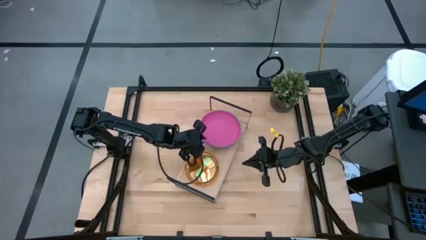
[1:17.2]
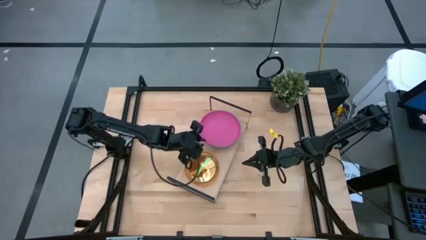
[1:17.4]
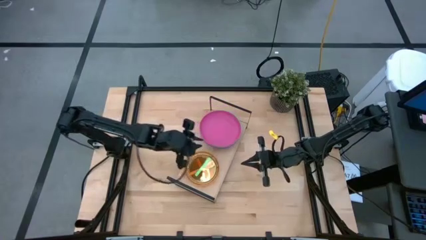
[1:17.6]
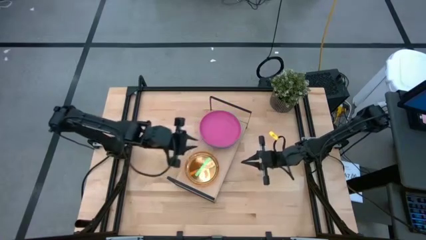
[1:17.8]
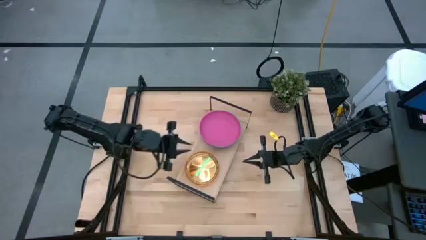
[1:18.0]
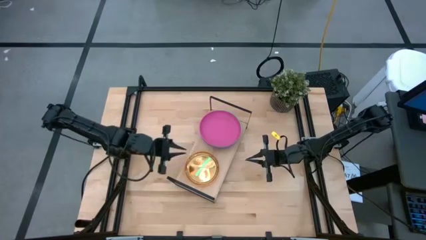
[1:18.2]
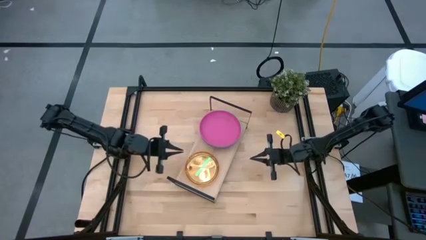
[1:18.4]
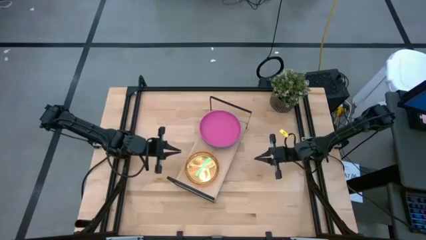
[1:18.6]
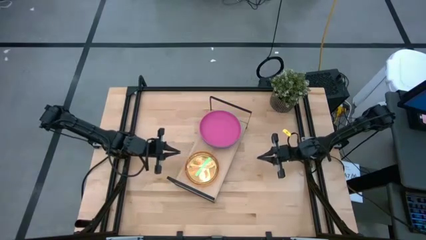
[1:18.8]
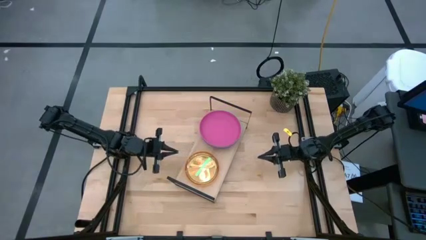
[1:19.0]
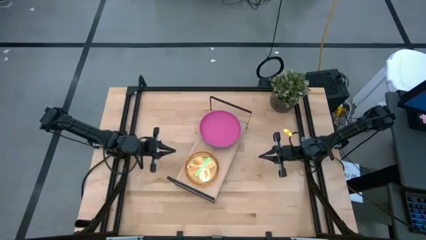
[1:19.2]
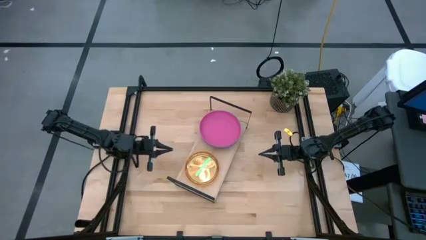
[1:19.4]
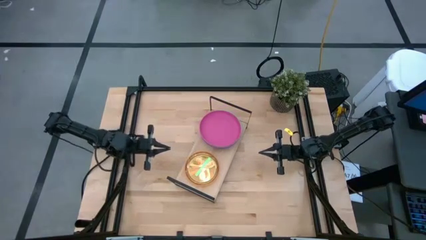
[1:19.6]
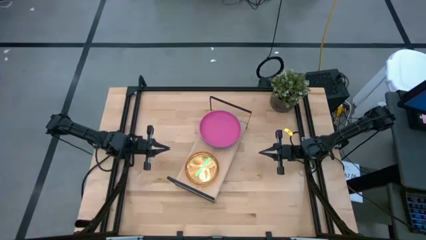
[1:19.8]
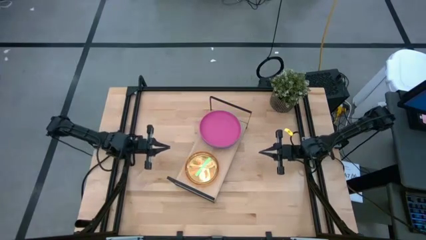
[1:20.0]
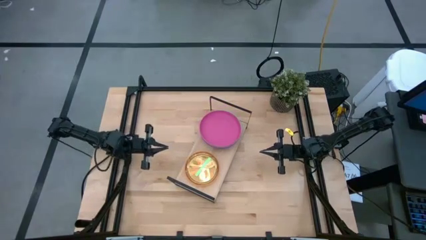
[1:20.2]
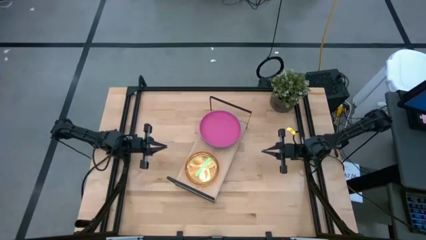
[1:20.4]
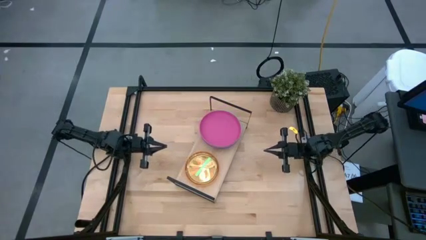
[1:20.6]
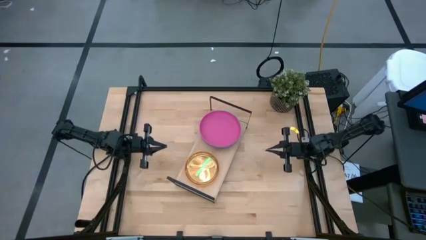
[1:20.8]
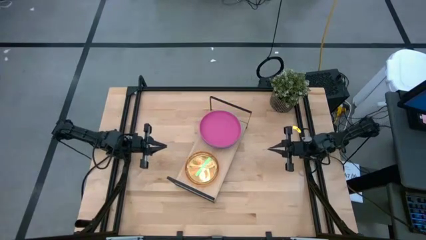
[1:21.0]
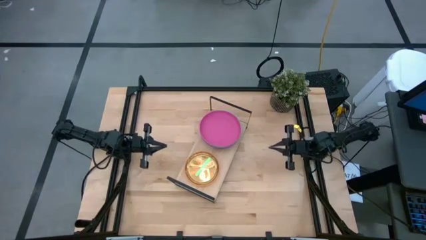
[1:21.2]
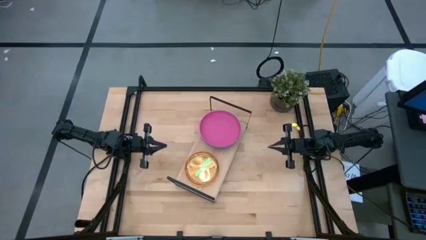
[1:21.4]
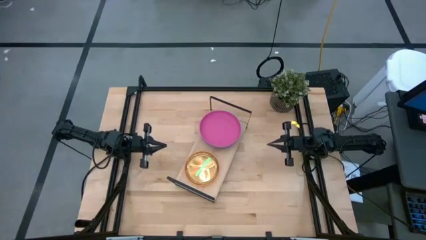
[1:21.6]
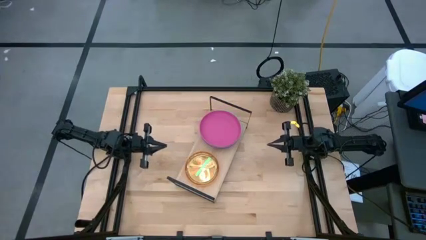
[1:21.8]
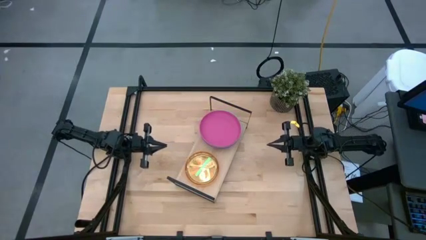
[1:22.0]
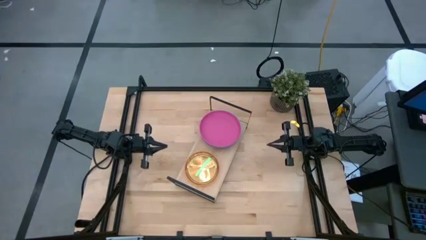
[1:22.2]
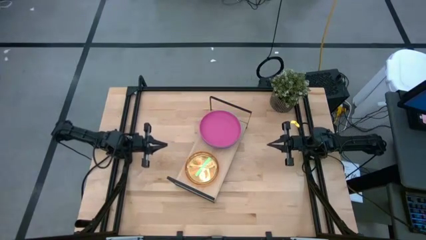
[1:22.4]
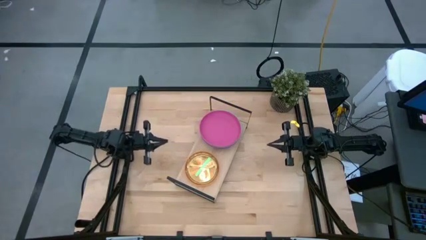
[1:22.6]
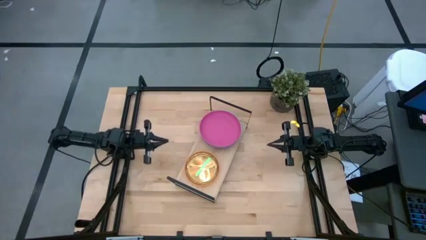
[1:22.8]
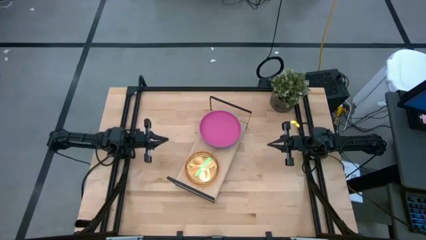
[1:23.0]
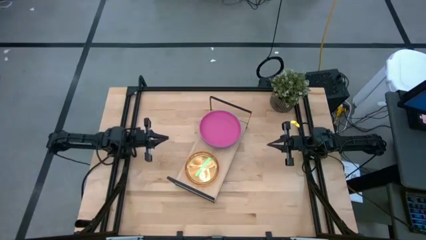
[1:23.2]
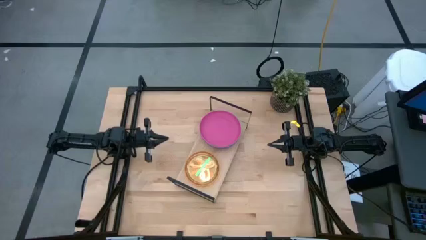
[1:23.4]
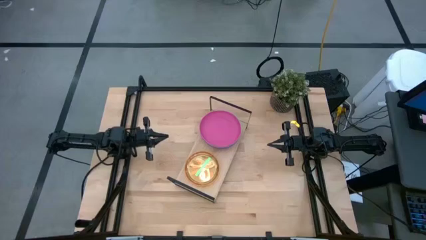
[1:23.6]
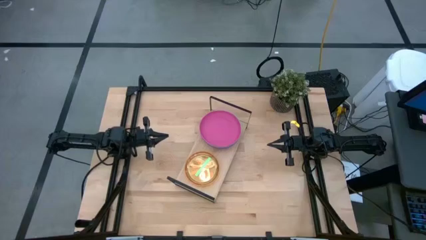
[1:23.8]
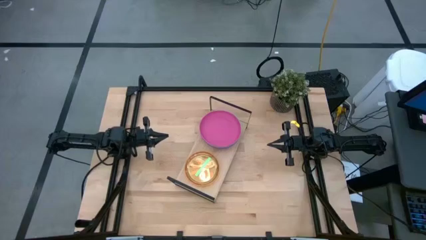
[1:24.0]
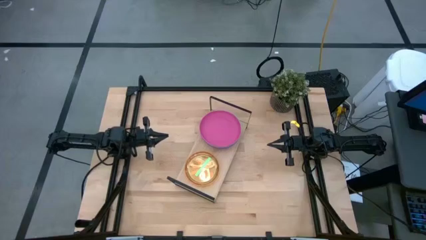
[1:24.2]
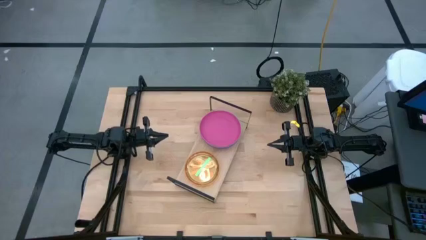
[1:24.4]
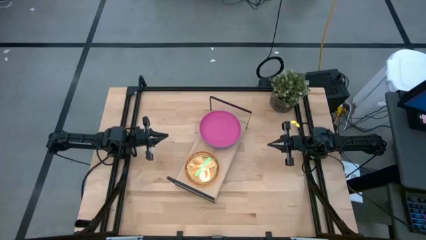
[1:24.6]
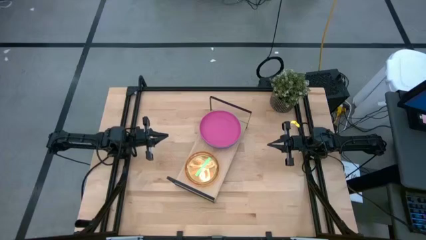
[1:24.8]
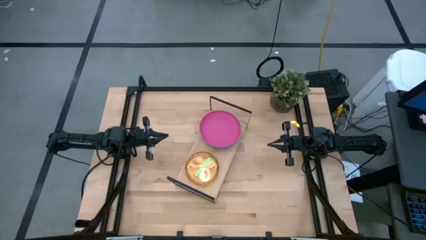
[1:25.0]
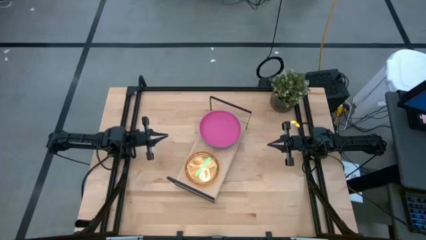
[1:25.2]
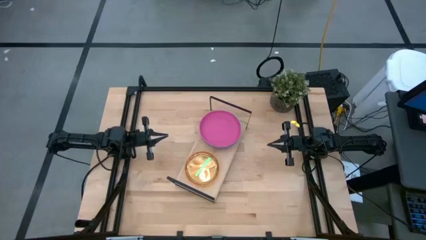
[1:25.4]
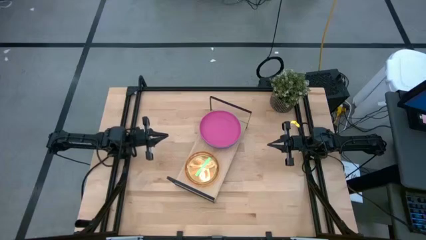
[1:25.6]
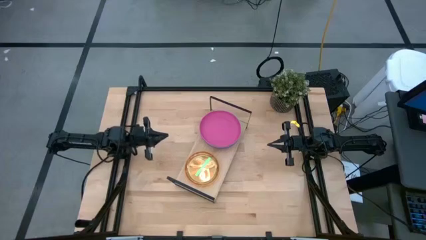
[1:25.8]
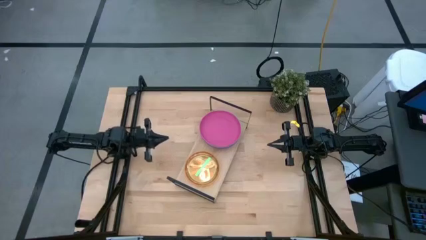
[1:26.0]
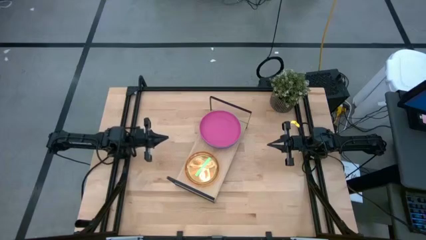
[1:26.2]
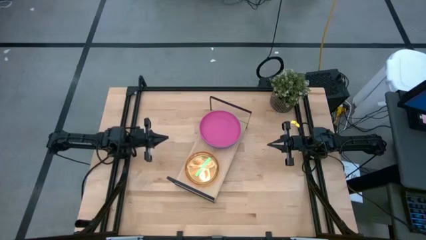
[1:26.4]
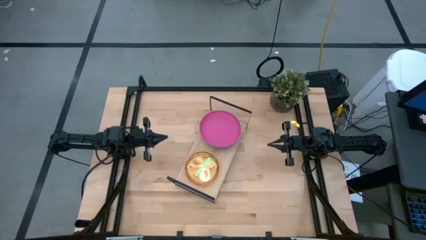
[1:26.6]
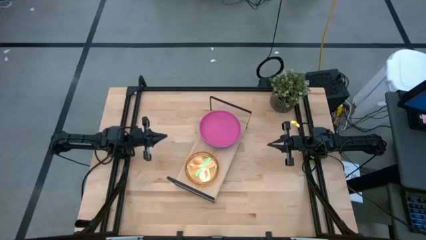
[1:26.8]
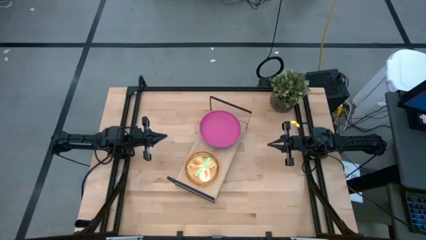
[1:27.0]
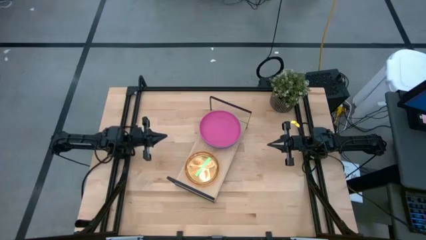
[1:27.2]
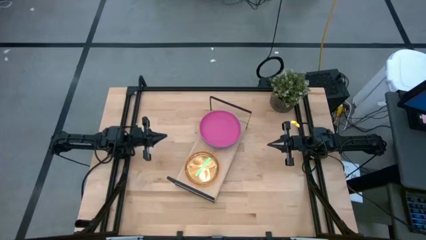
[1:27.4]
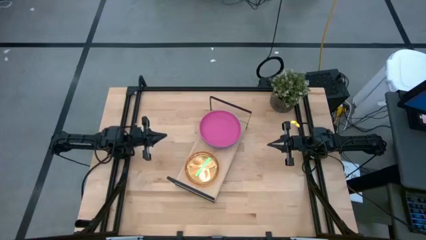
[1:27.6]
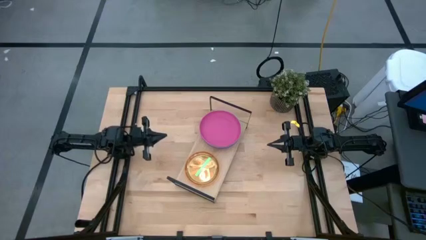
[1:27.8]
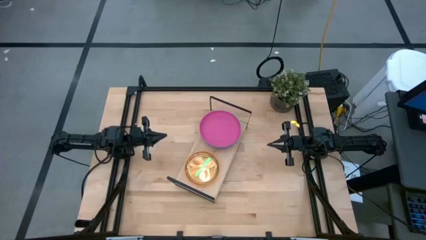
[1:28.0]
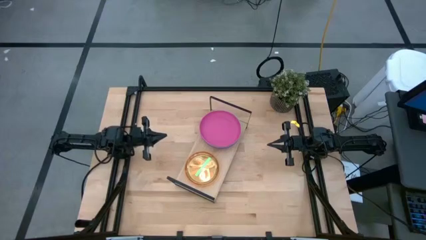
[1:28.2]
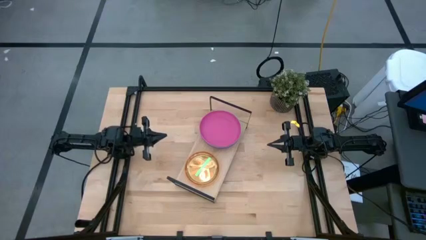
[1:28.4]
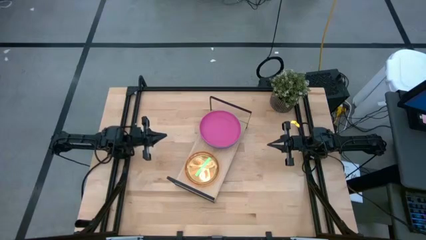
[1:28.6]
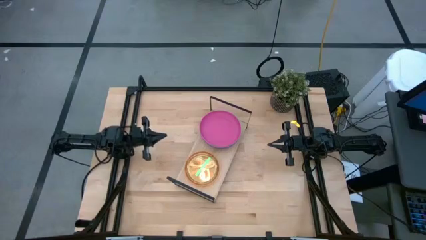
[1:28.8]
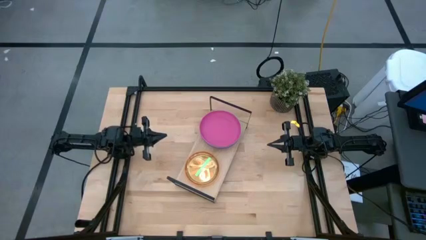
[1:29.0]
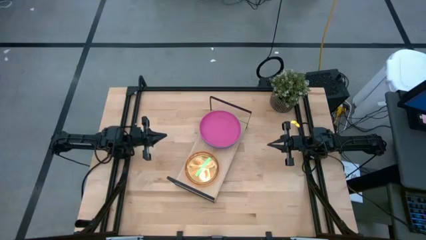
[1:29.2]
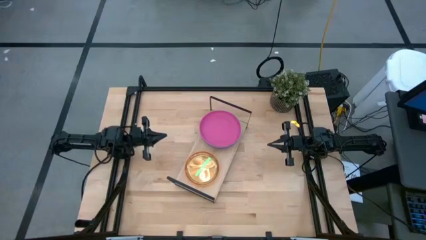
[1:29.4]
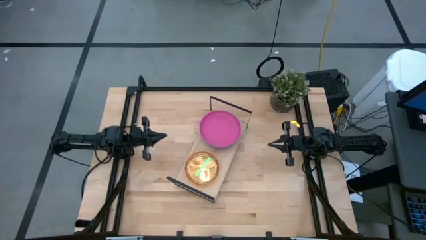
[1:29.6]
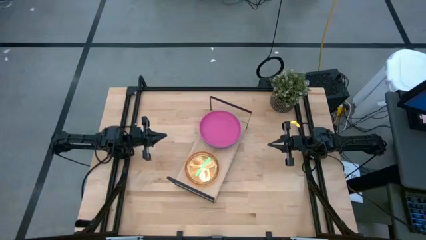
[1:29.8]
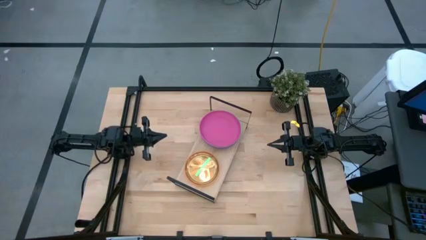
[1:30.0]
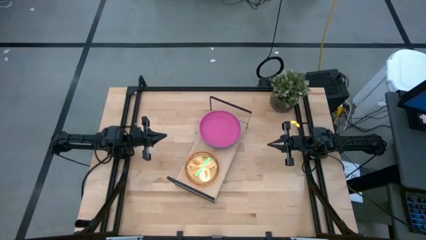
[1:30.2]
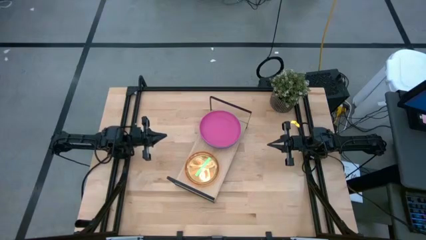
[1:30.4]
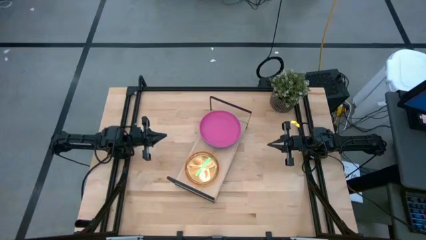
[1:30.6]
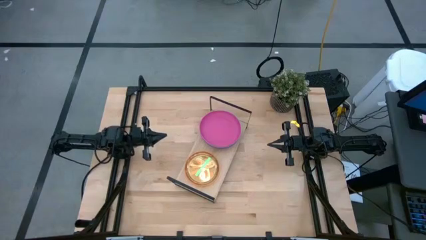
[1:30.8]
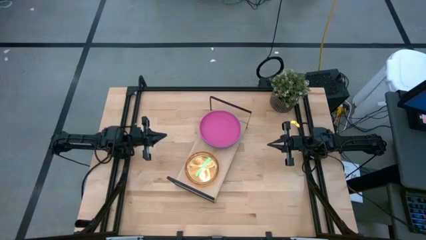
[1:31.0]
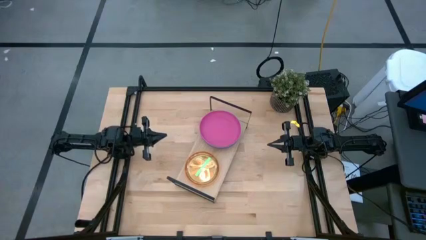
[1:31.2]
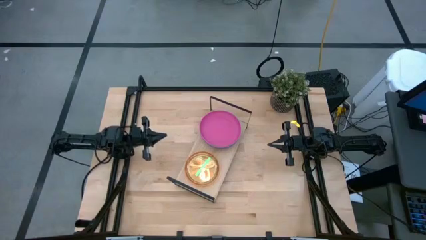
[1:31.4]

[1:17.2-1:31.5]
Task: Place and stack plates onto a shelf
Return to Home Position

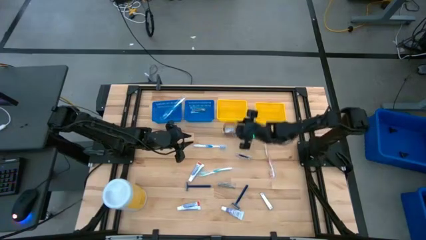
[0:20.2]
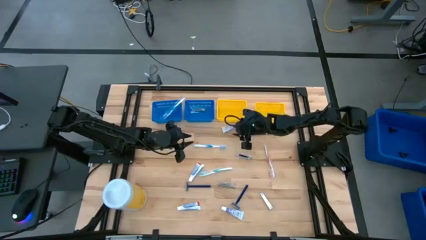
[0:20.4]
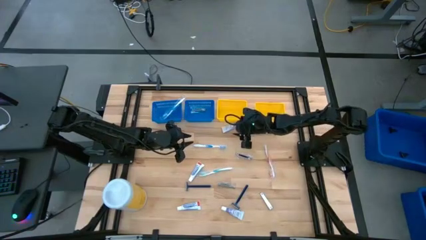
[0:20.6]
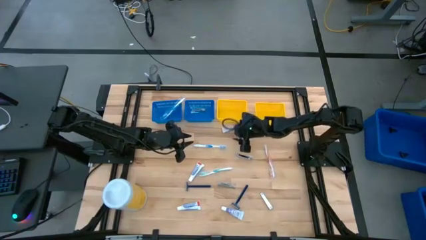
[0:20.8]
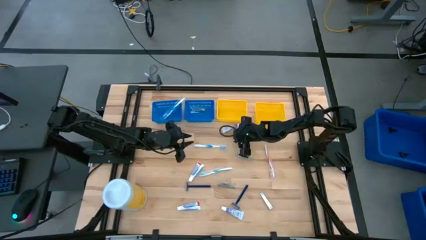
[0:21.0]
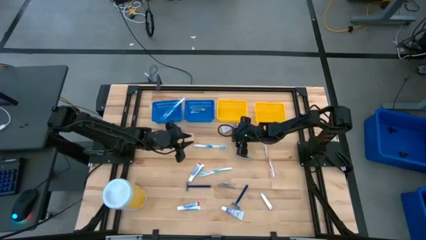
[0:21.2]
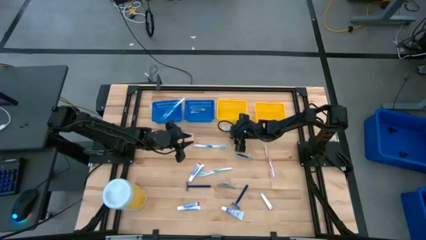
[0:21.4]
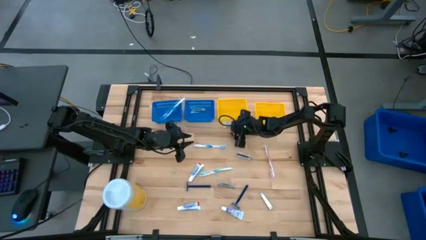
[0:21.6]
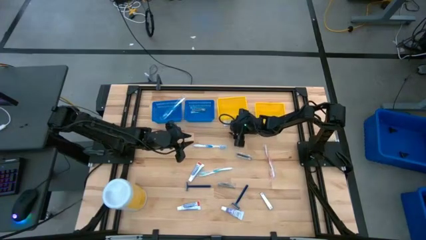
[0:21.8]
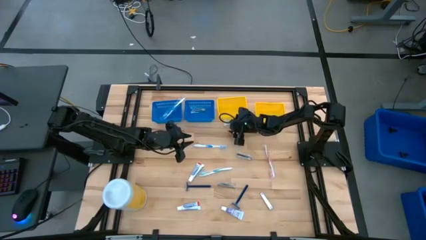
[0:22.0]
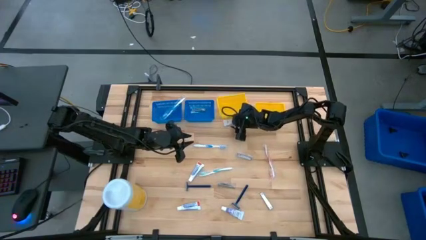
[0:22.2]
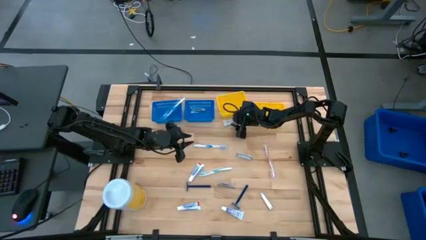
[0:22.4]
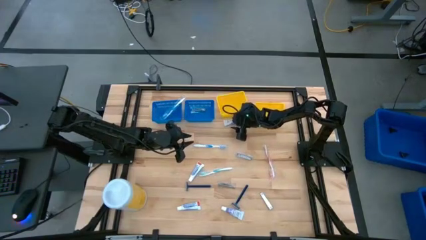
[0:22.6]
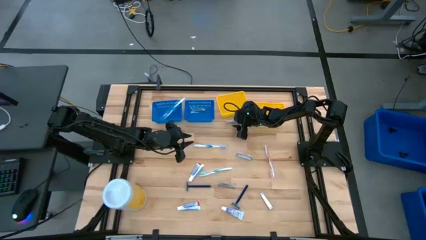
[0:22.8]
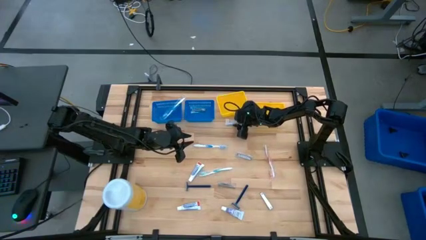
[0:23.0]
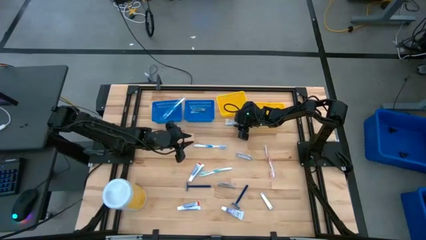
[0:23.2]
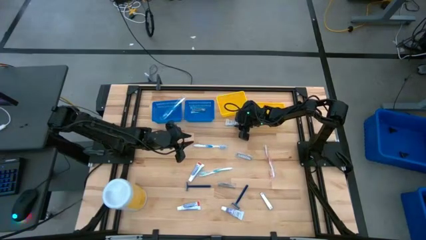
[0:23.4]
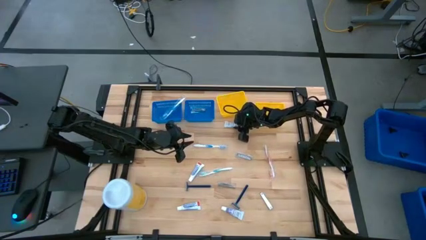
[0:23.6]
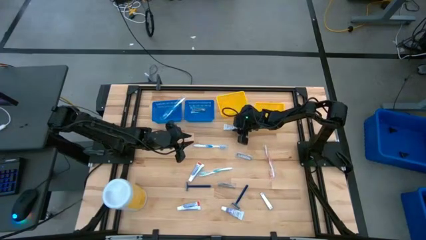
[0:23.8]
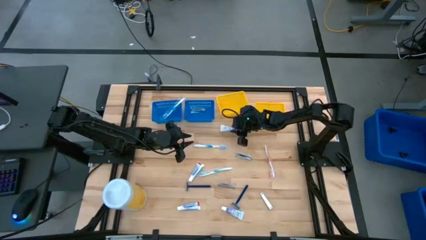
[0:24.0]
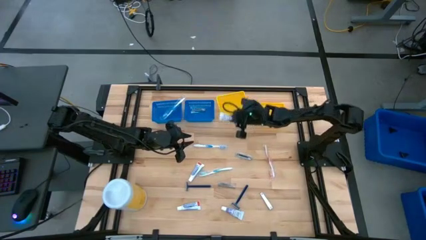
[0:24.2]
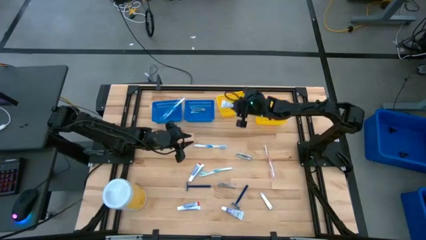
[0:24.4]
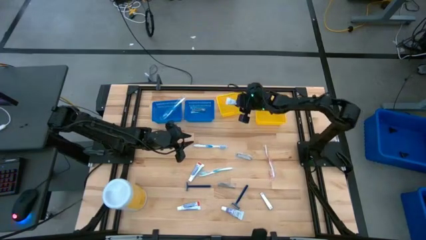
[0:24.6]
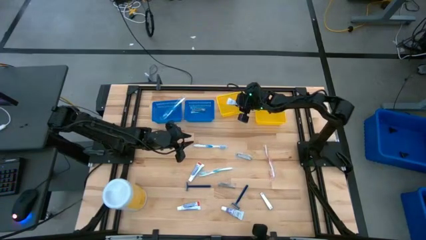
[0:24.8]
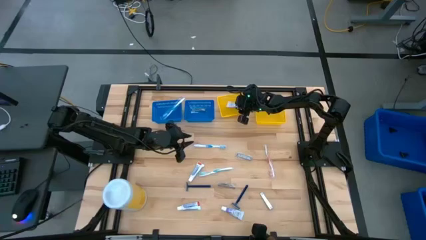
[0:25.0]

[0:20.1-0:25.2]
Task: Pick & Place Travel size toiletries
Put the white toothpaste into the left yellow bin
